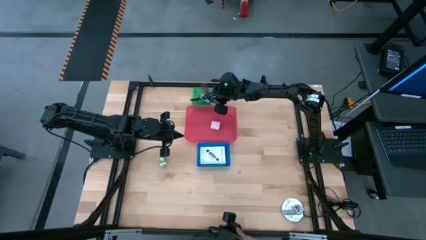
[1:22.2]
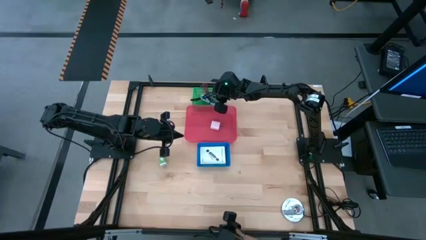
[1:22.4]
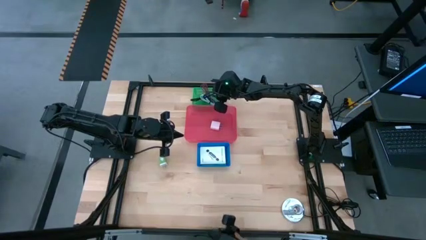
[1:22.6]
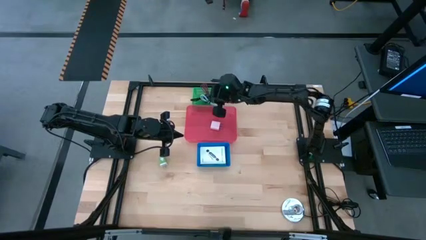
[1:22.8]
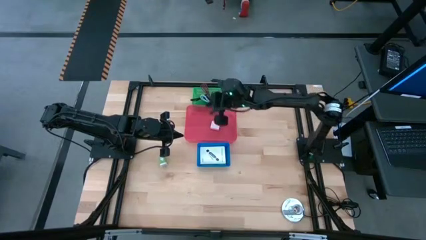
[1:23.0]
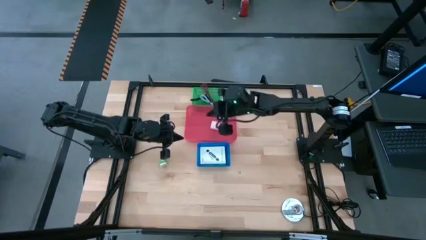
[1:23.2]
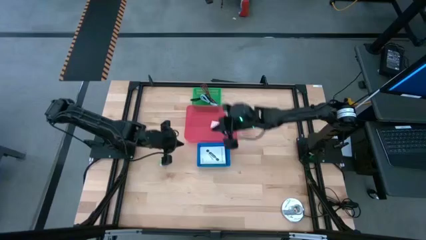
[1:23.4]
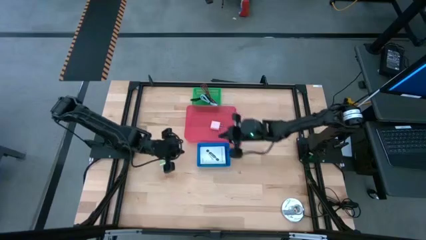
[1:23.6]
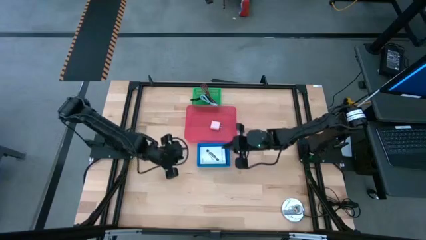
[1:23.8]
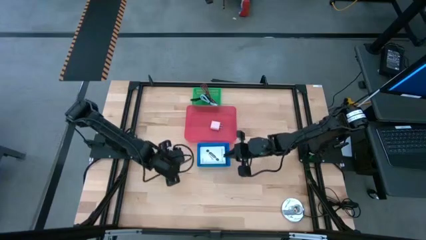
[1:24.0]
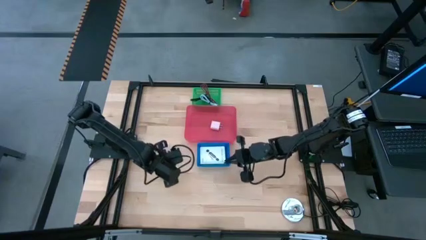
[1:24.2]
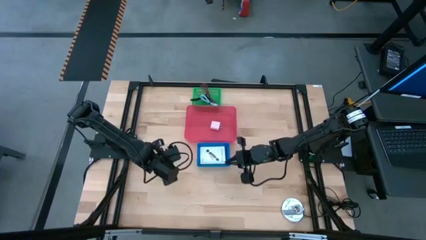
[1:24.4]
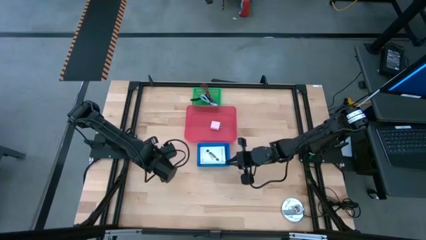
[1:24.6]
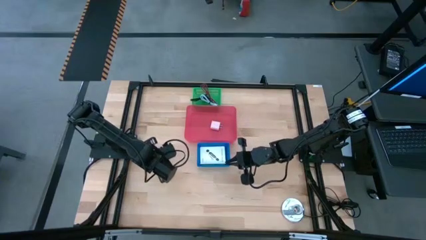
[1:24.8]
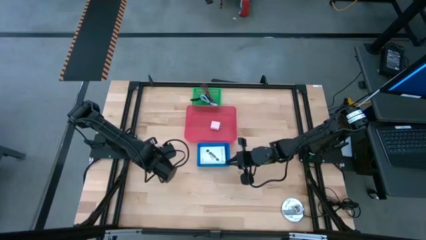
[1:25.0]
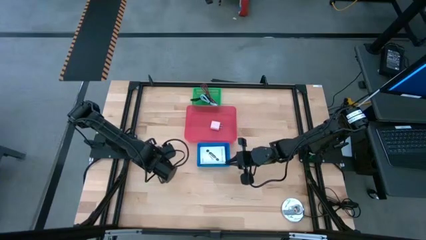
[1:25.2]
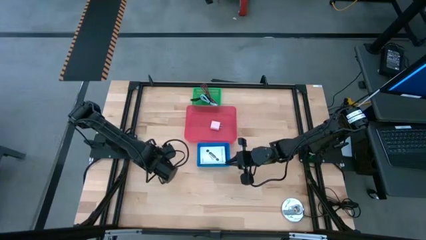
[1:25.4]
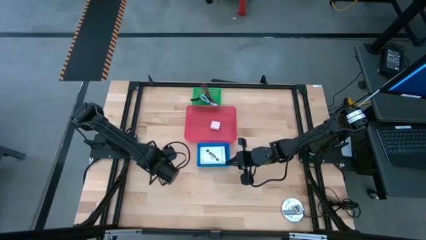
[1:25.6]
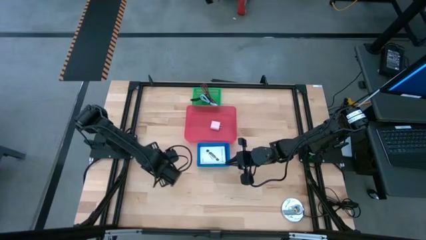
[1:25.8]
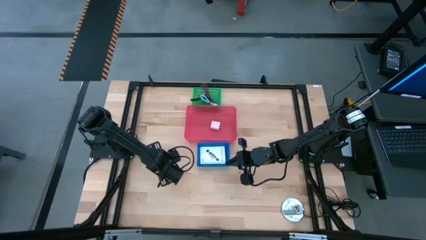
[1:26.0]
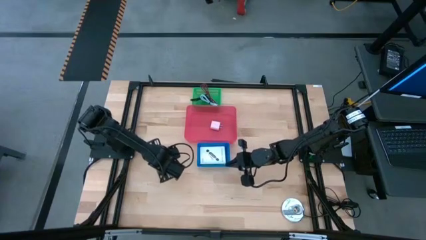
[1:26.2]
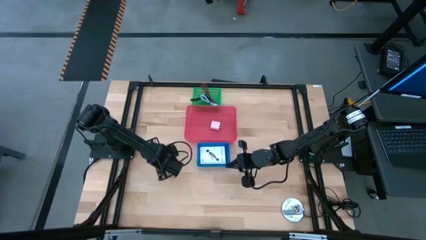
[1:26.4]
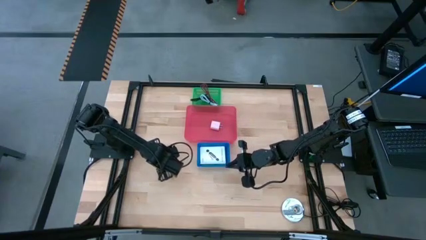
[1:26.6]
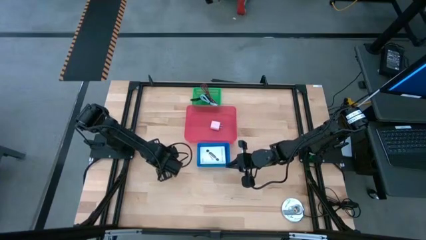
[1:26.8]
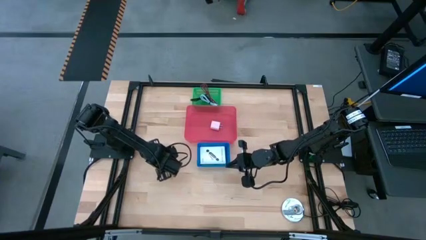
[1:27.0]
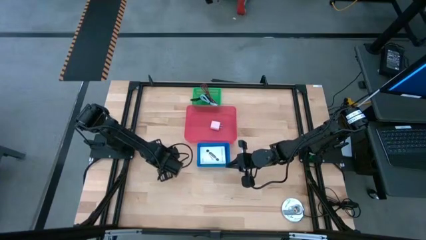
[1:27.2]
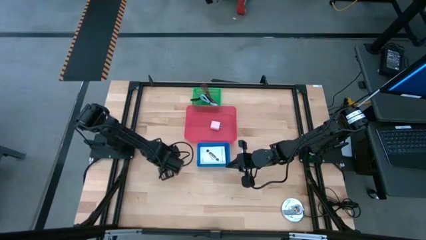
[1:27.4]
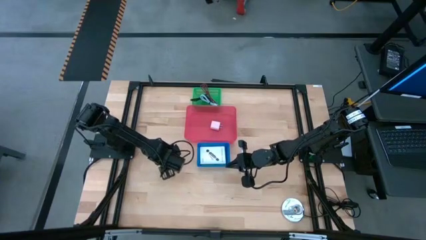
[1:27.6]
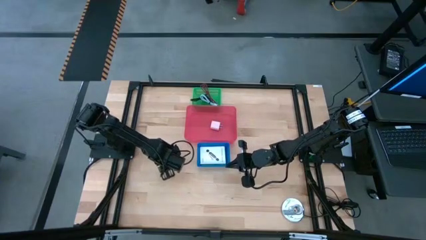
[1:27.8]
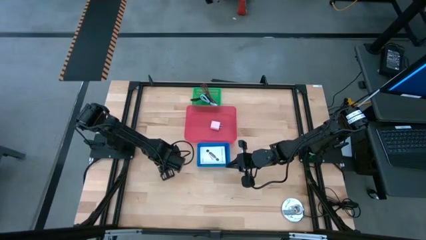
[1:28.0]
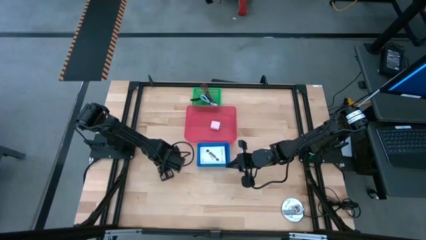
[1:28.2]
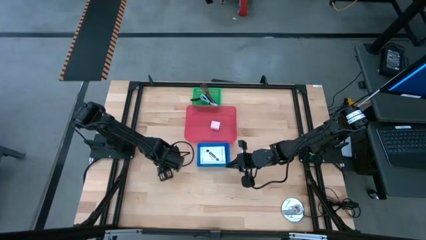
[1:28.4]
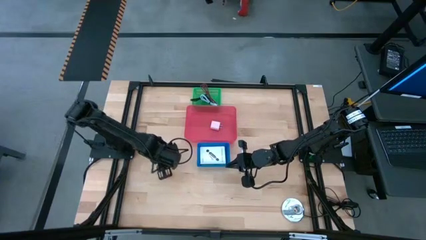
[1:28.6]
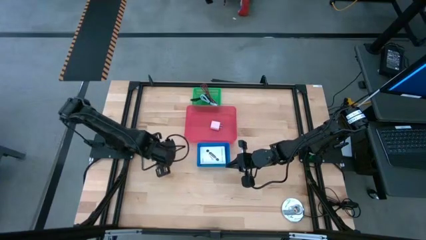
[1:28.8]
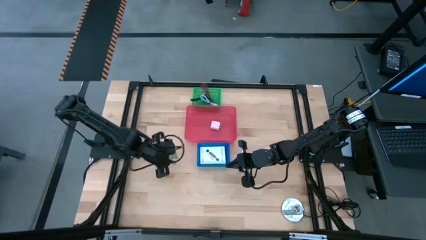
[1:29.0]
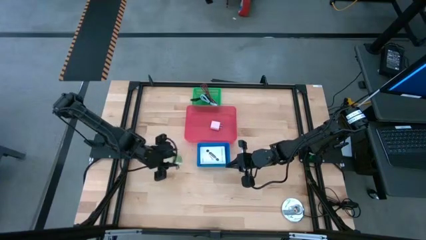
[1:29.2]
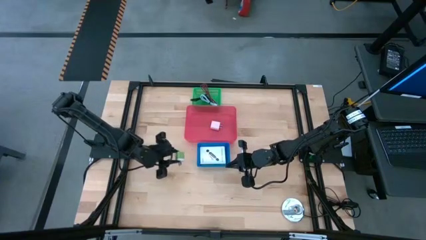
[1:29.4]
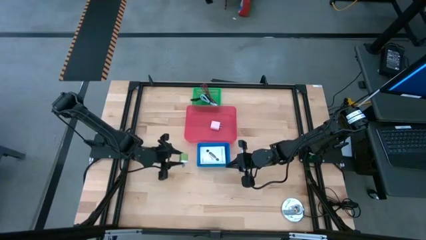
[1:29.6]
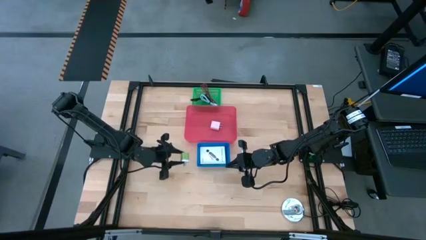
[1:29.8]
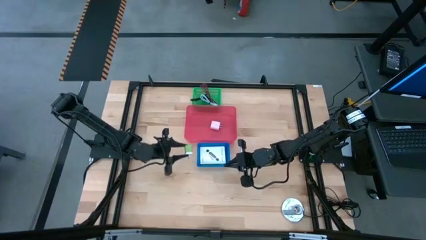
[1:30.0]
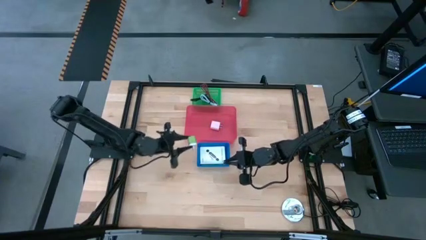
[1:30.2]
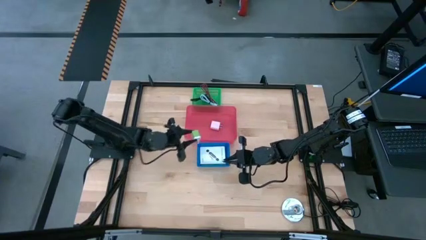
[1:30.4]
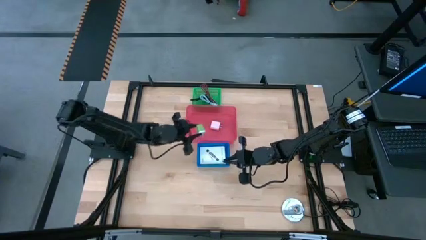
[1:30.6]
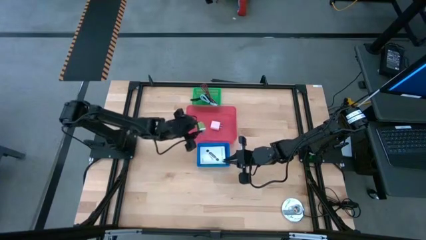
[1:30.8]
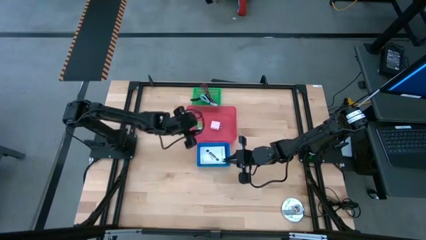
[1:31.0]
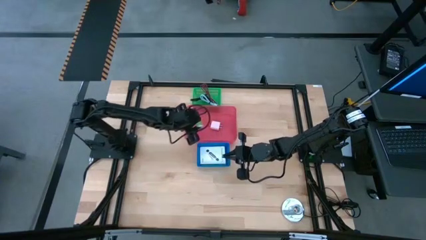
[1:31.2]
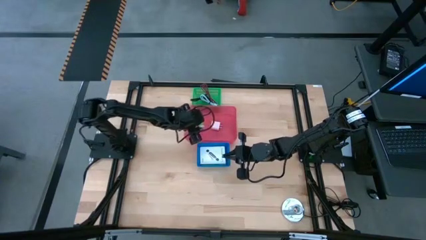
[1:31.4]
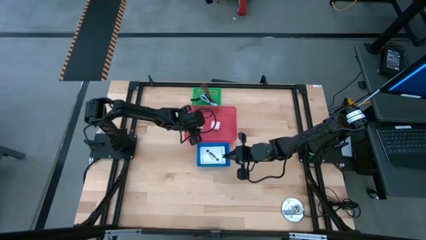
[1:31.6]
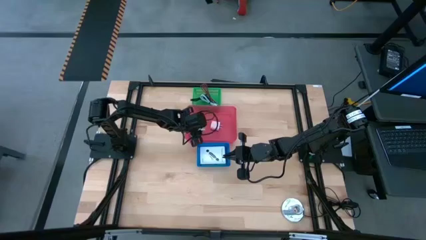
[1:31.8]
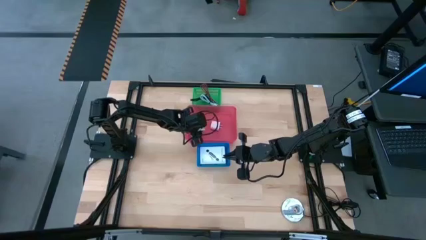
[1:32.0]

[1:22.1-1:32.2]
Task: Pick and place items into bin
Put the green charger adapter into the red bin

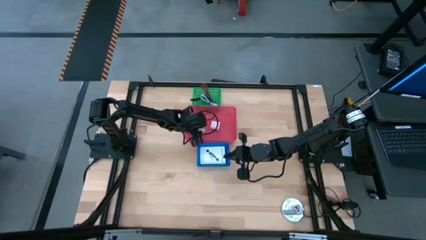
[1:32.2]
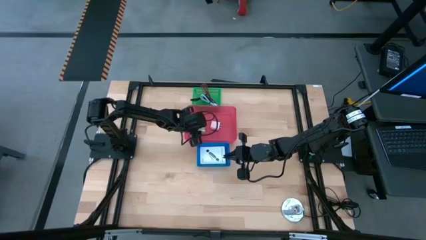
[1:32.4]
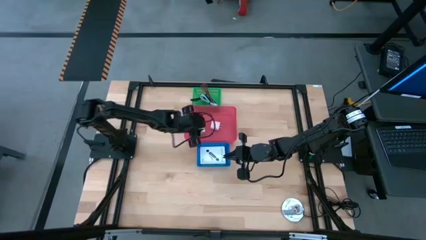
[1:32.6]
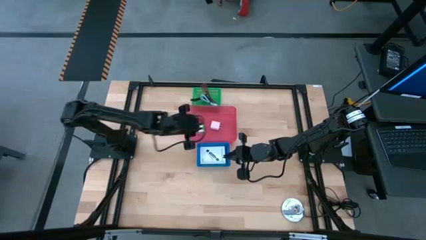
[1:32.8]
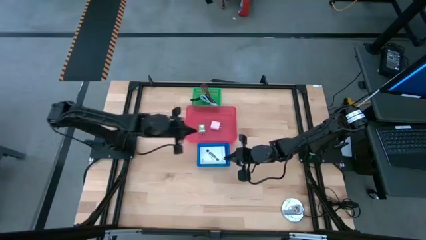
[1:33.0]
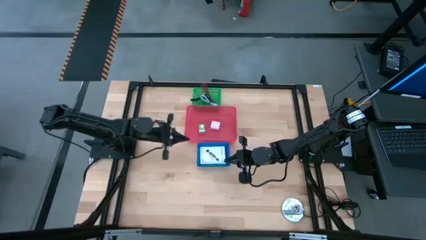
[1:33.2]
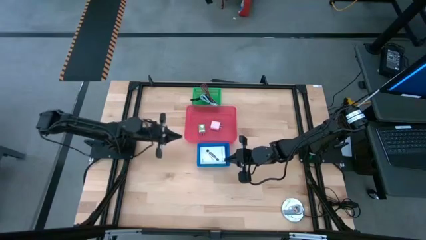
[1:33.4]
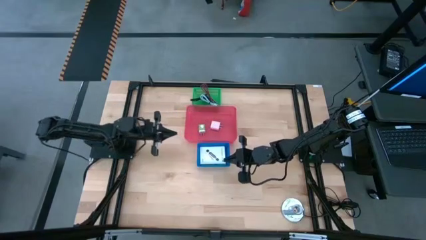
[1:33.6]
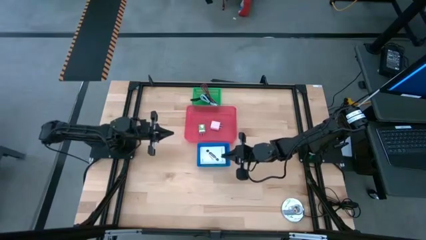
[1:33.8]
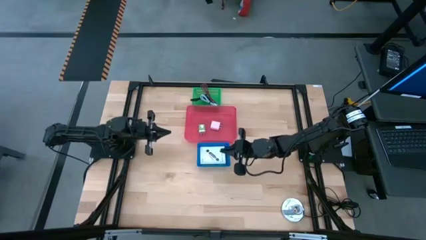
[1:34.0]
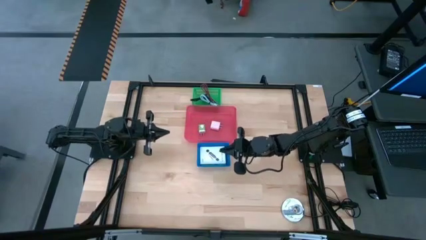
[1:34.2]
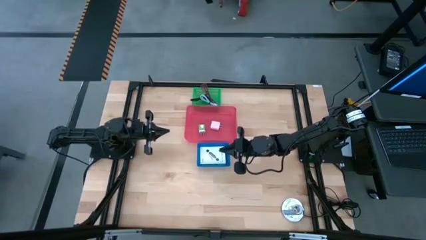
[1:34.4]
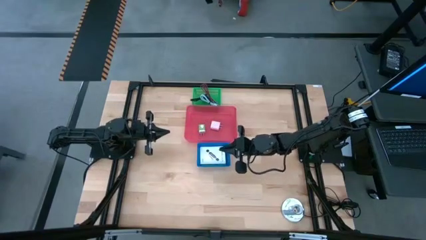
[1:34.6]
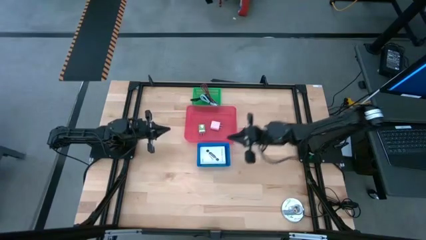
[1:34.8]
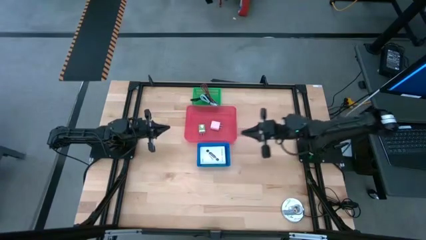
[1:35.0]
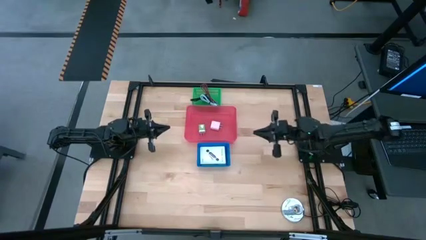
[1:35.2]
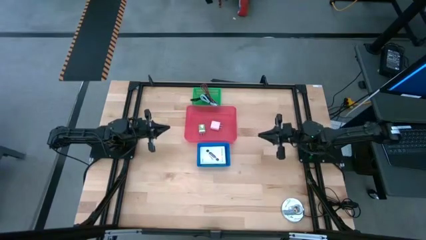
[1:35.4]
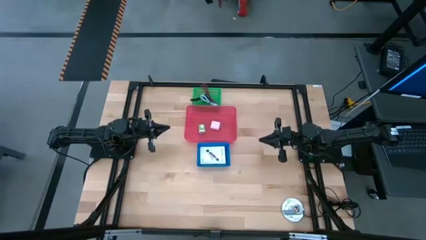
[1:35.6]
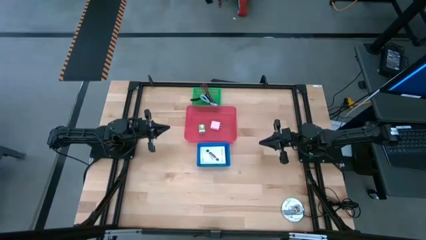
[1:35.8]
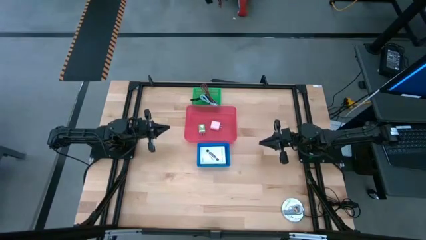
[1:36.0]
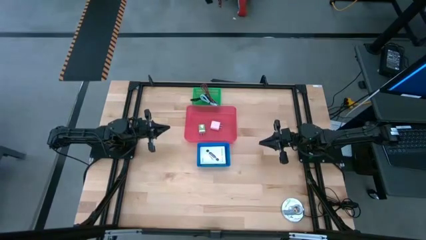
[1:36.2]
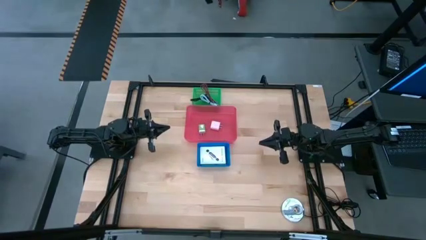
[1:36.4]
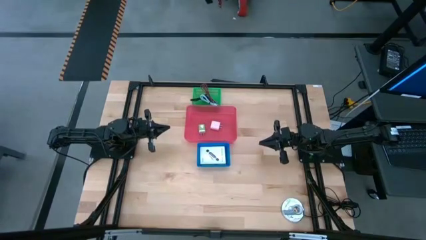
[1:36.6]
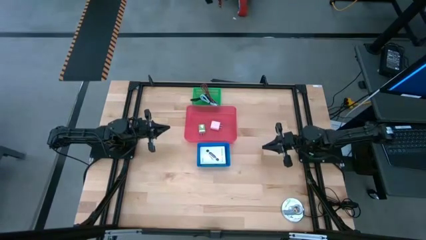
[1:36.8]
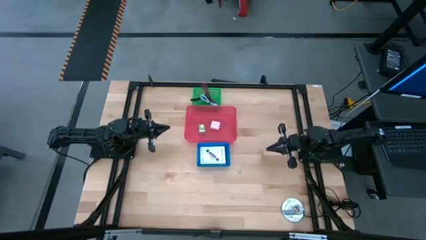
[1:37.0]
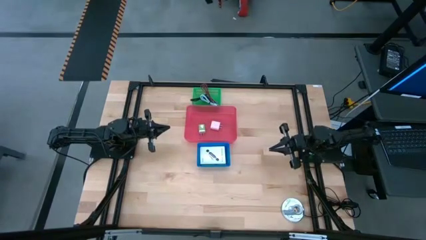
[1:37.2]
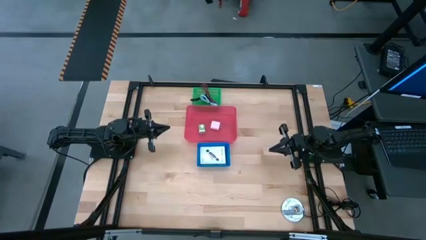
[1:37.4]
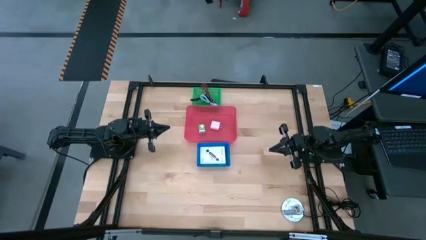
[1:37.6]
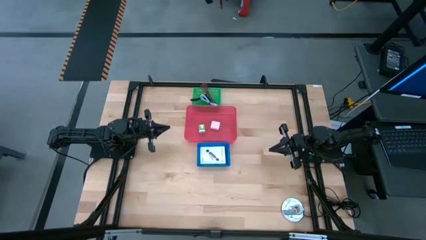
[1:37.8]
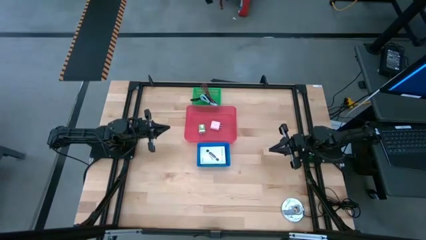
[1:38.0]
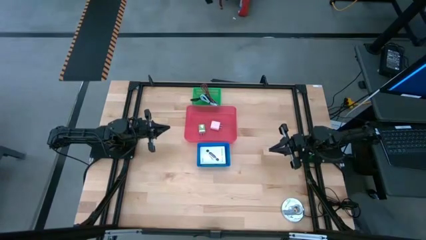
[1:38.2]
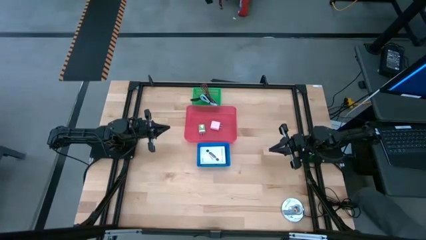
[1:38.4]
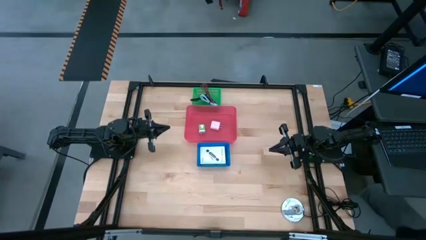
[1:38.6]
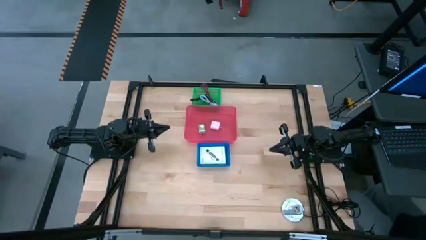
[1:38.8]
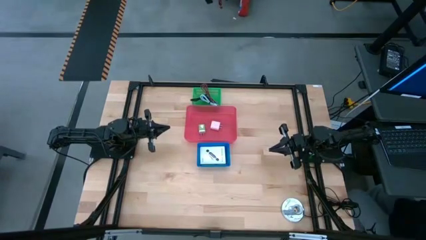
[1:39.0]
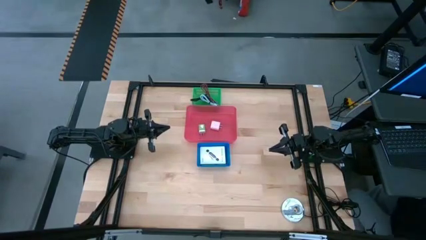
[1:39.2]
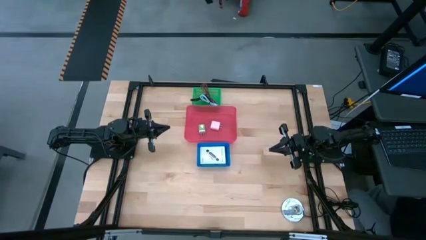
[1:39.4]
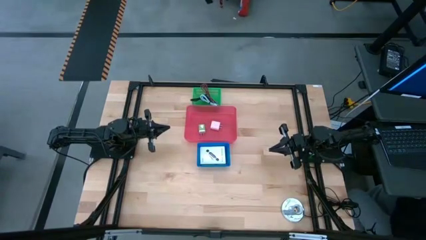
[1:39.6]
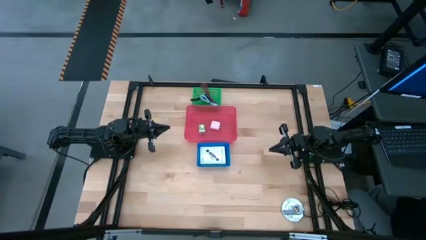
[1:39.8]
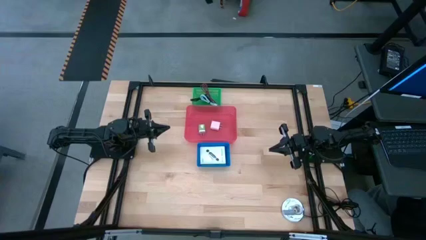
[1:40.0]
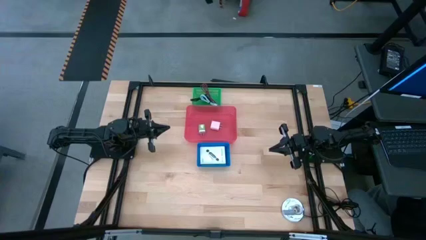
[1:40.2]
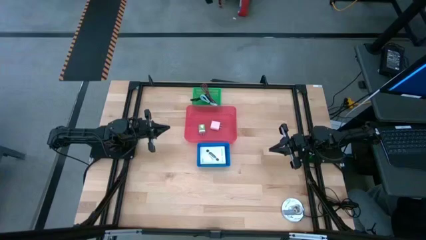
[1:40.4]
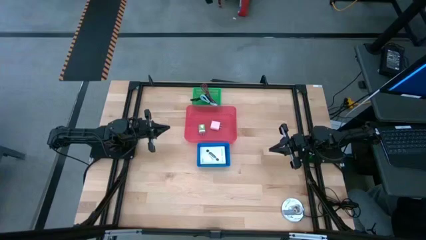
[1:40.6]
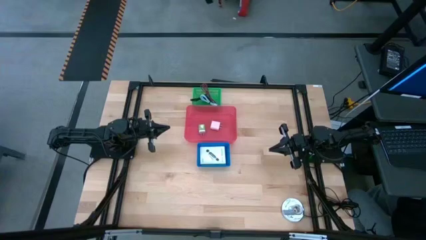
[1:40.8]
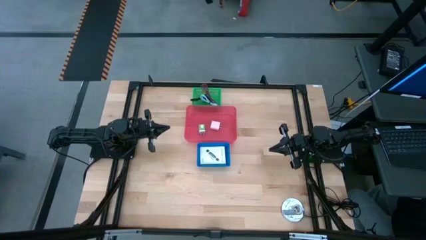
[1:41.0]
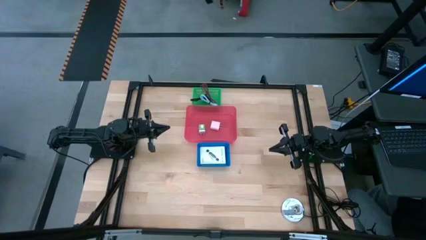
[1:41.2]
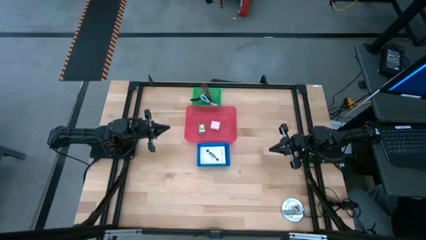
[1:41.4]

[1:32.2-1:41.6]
Return to Home Position
